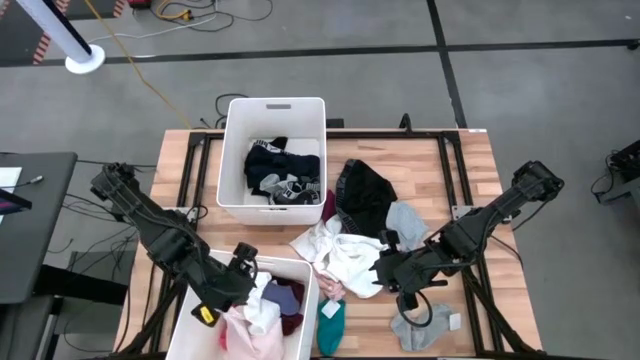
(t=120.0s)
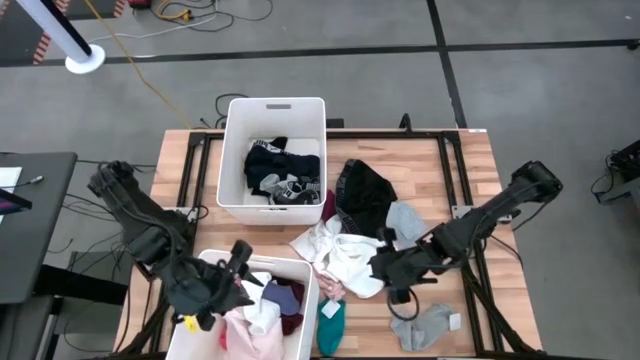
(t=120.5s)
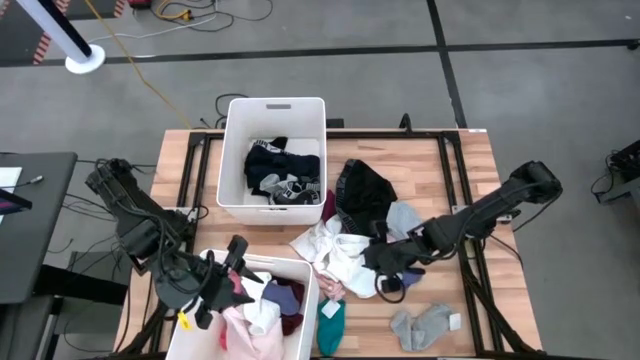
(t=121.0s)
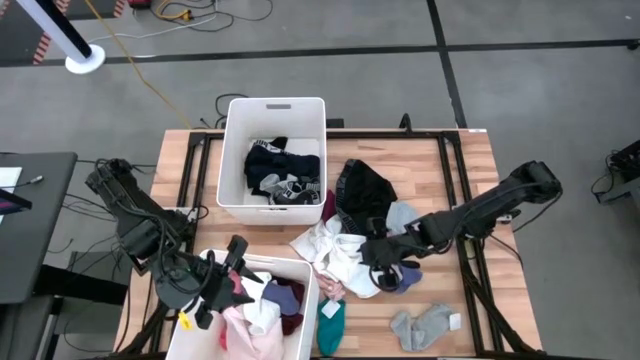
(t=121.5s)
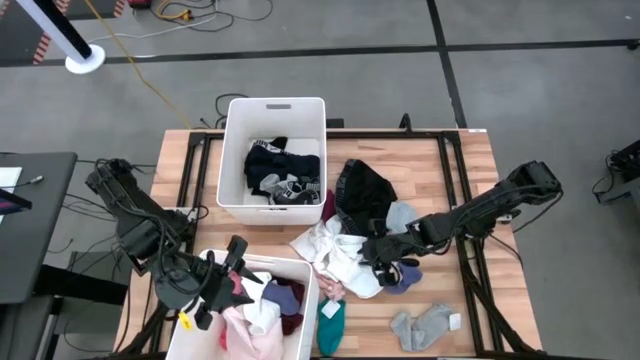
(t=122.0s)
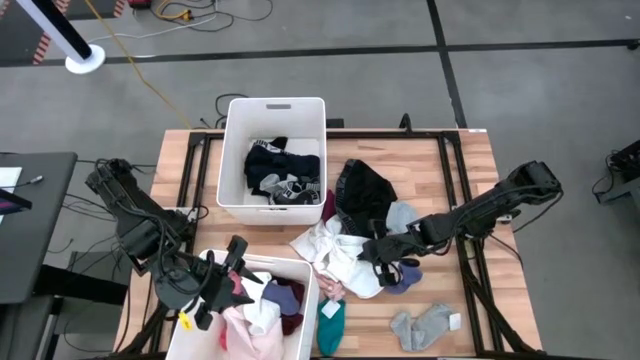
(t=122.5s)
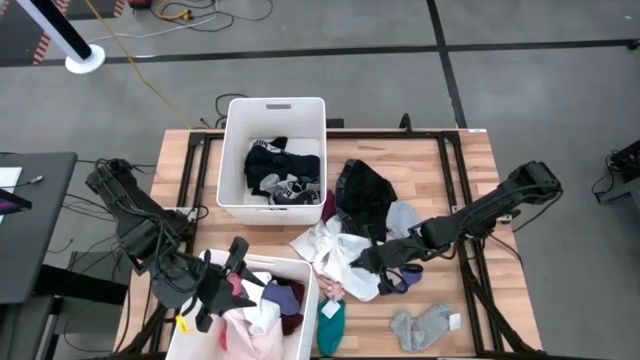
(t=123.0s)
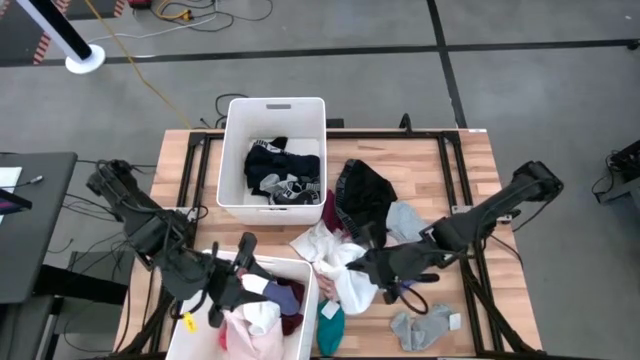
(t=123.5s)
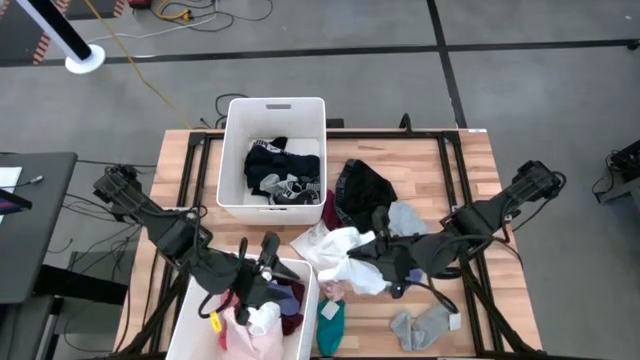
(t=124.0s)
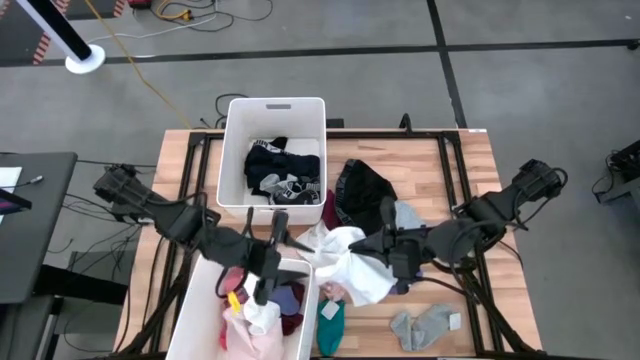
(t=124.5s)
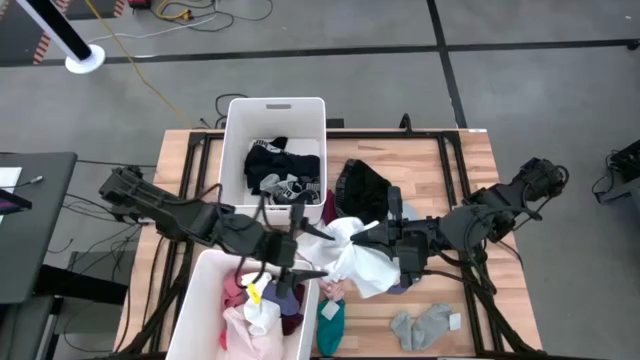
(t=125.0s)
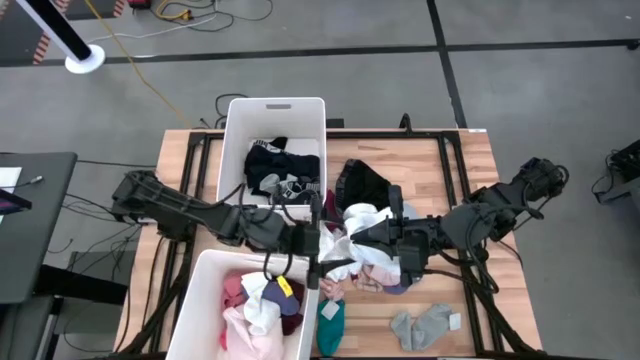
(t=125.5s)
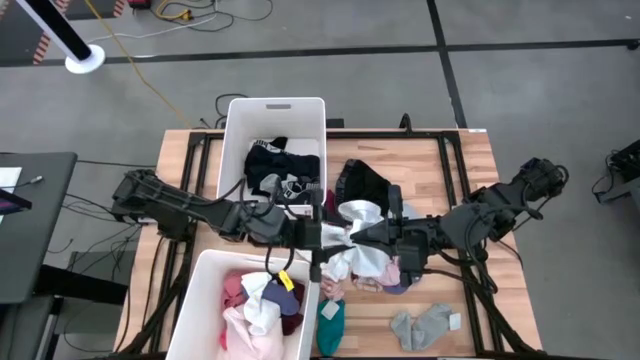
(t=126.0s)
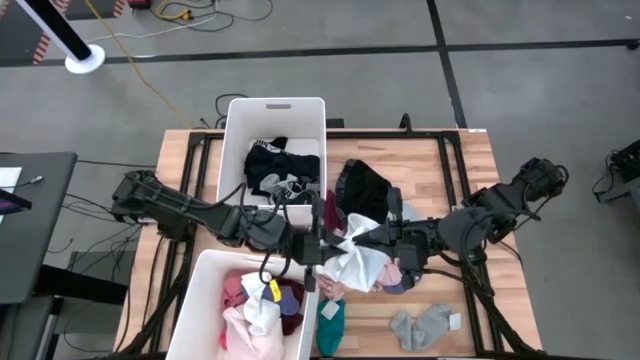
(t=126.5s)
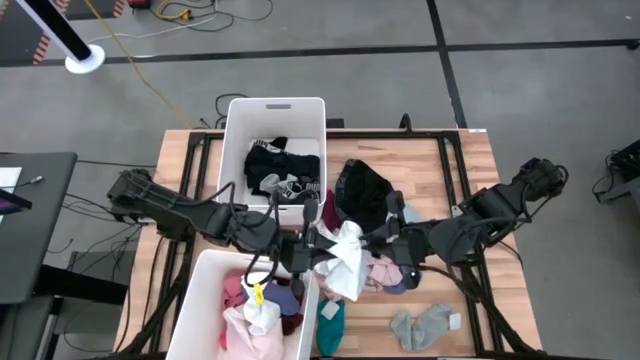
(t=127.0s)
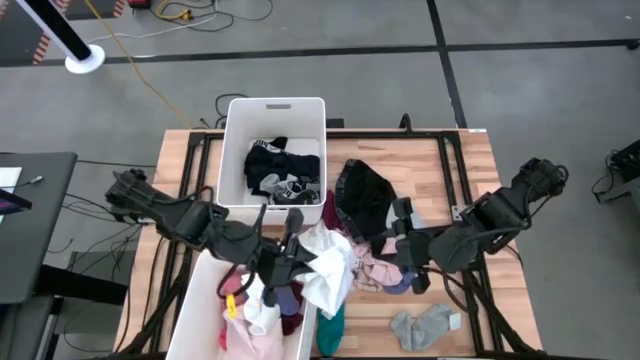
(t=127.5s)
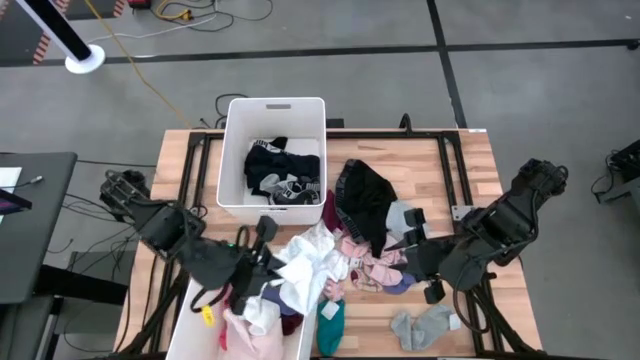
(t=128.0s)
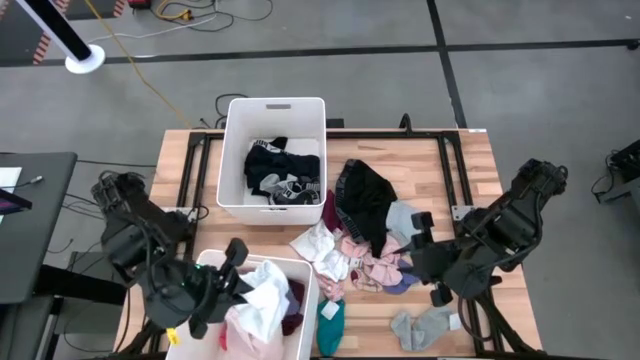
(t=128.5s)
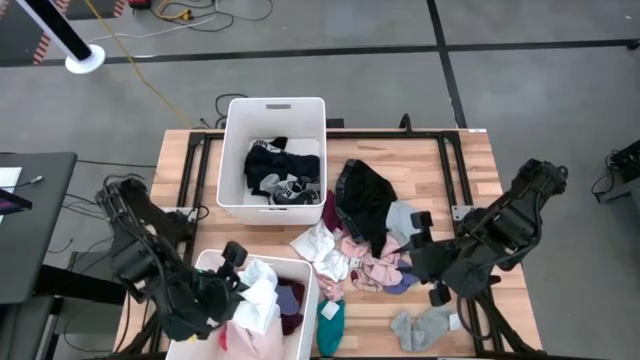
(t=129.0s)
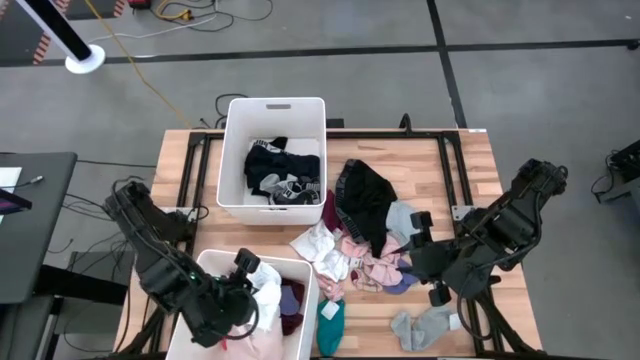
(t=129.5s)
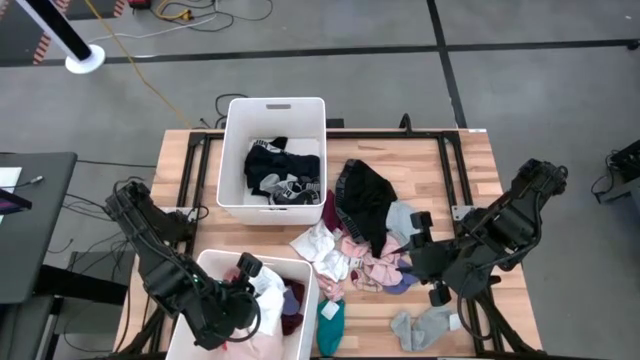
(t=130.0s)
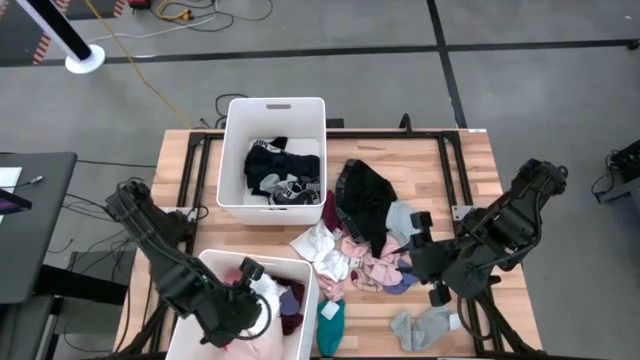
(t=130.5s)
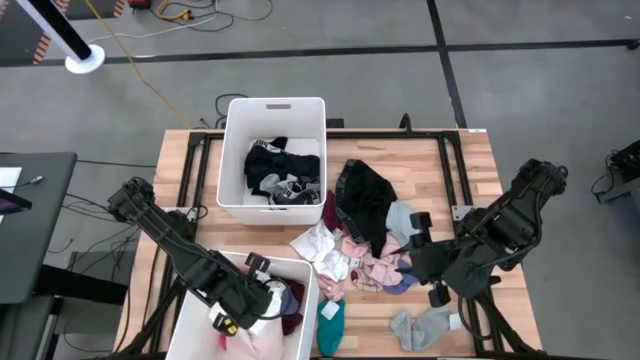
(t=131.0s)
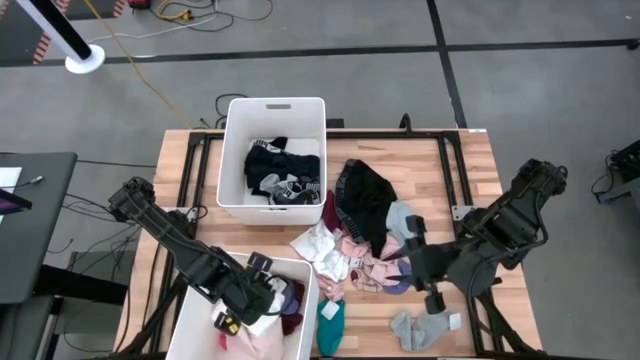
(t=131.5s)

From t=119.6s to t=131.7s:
Task: Sort clothes
Put the white underwear into the bottom white laundry bin
